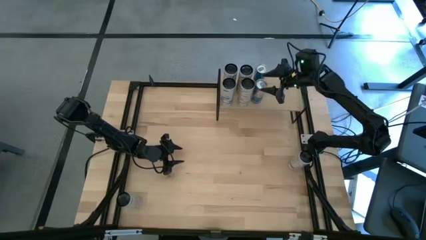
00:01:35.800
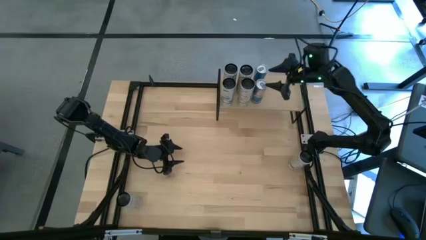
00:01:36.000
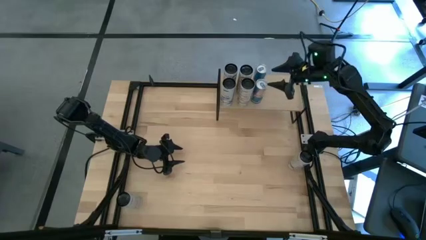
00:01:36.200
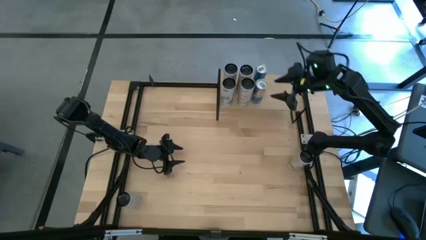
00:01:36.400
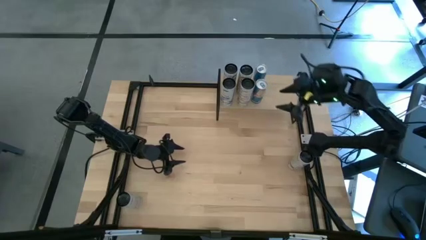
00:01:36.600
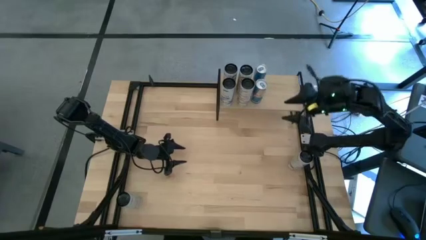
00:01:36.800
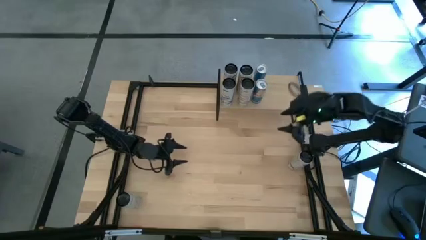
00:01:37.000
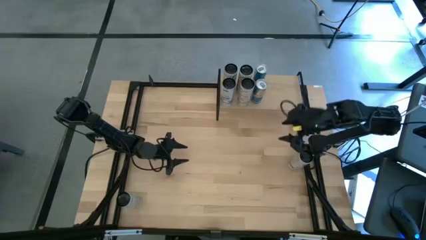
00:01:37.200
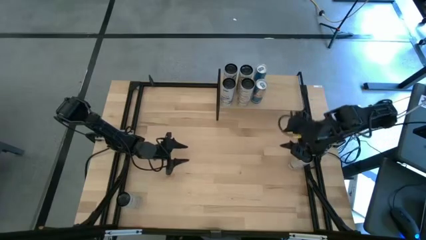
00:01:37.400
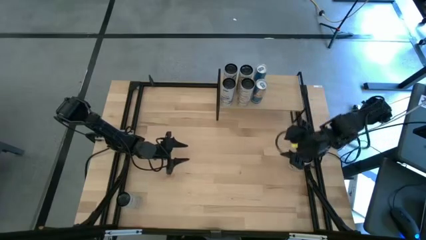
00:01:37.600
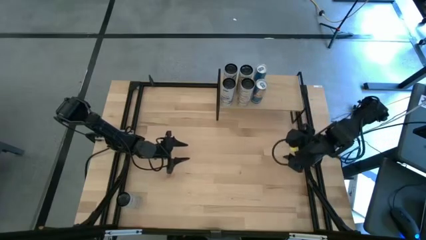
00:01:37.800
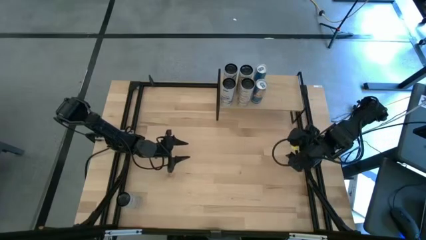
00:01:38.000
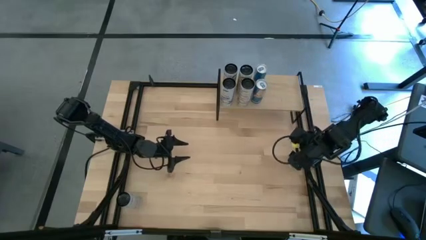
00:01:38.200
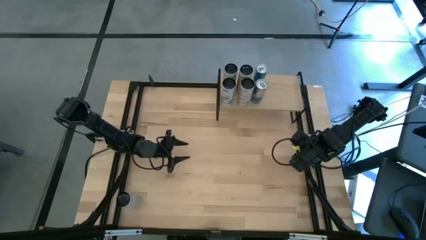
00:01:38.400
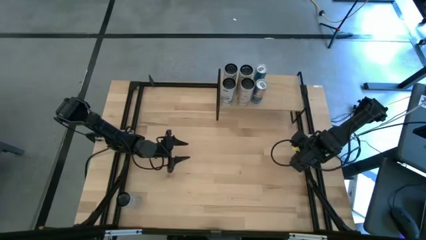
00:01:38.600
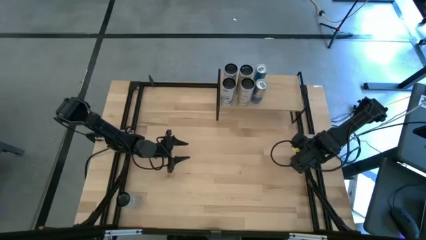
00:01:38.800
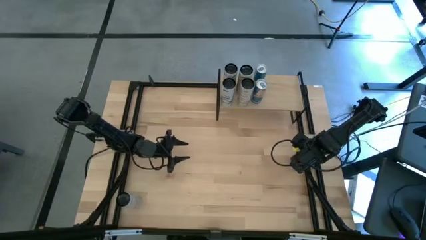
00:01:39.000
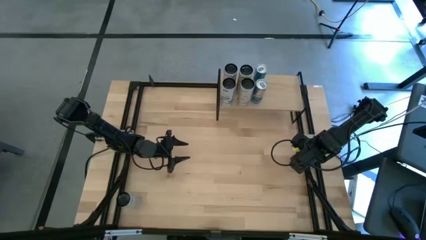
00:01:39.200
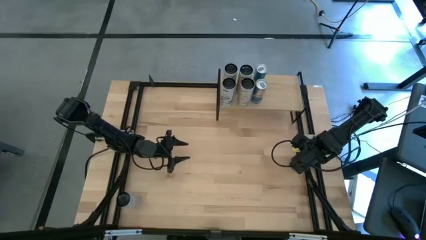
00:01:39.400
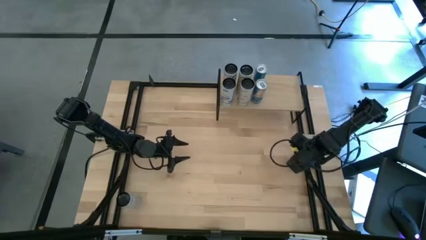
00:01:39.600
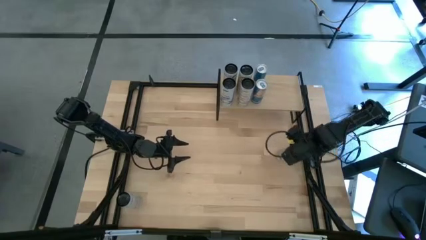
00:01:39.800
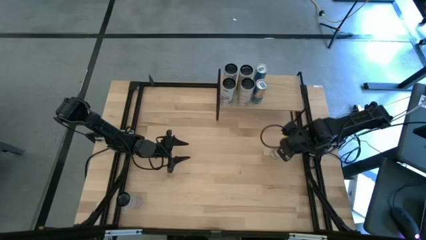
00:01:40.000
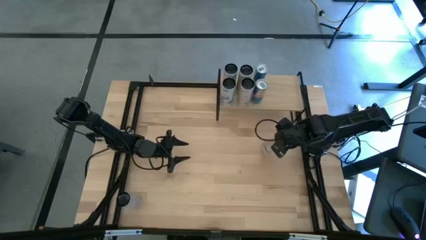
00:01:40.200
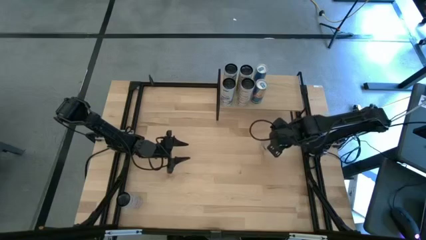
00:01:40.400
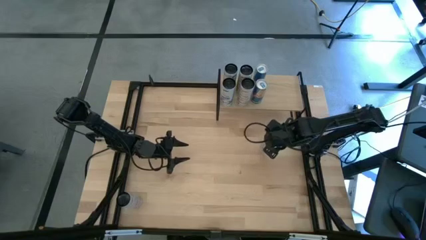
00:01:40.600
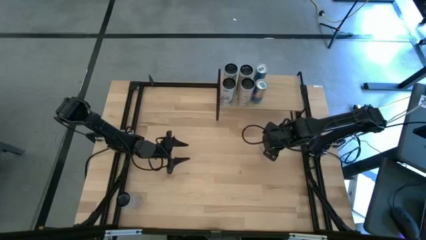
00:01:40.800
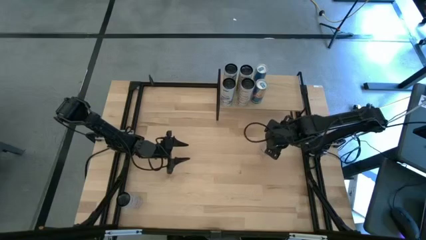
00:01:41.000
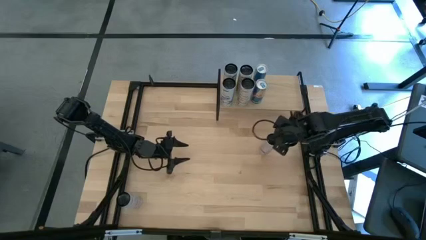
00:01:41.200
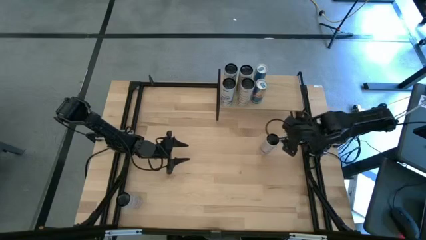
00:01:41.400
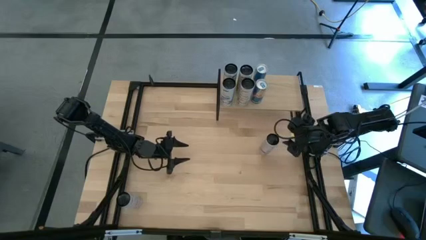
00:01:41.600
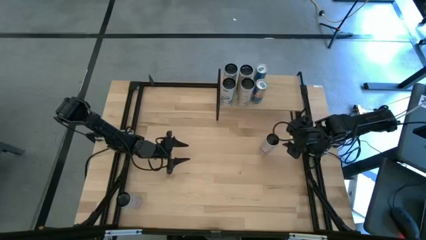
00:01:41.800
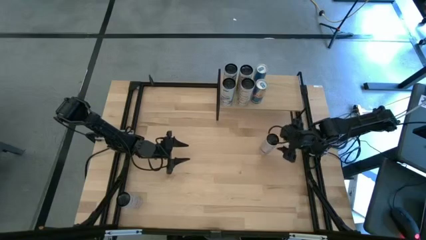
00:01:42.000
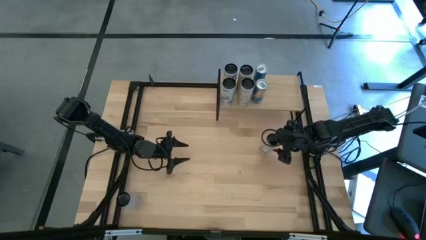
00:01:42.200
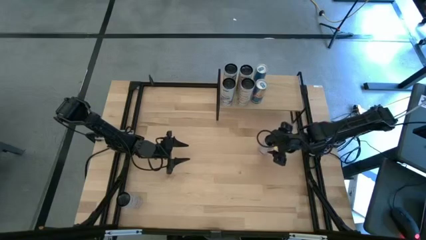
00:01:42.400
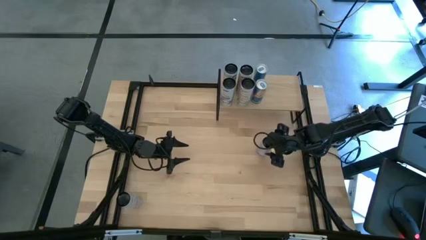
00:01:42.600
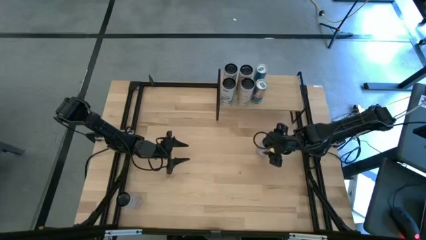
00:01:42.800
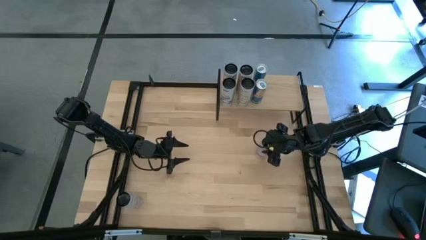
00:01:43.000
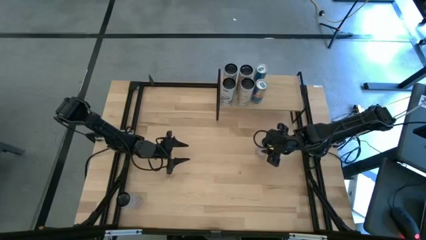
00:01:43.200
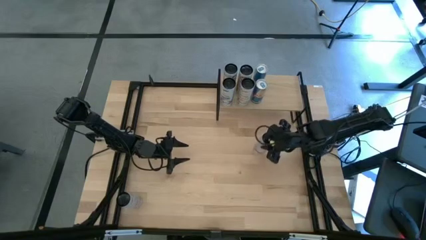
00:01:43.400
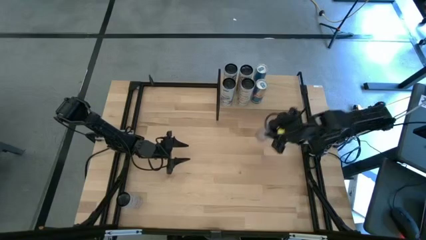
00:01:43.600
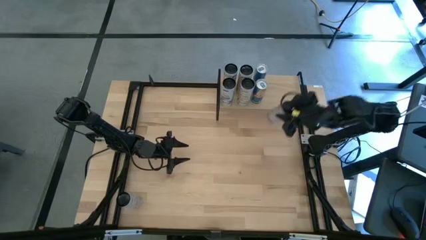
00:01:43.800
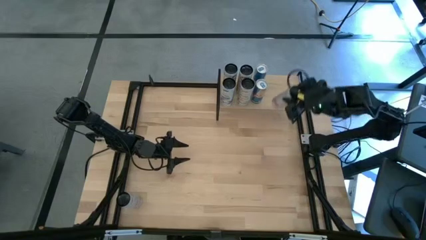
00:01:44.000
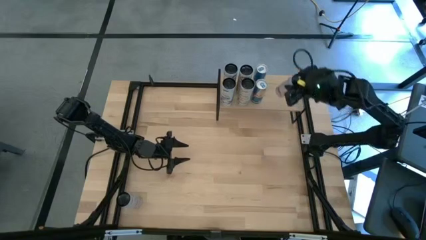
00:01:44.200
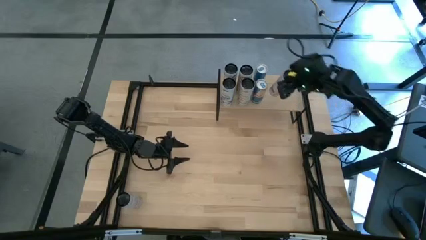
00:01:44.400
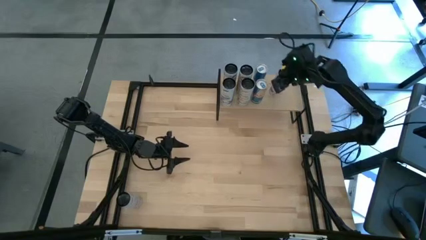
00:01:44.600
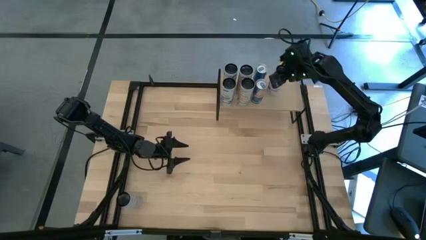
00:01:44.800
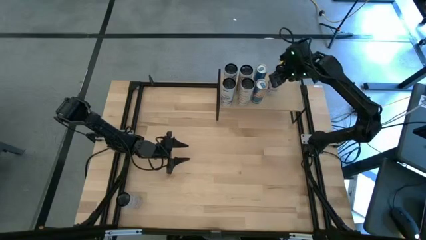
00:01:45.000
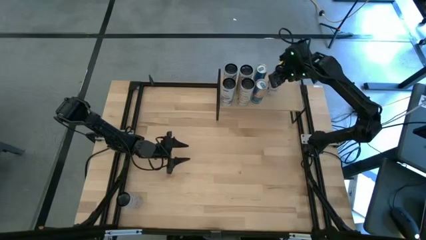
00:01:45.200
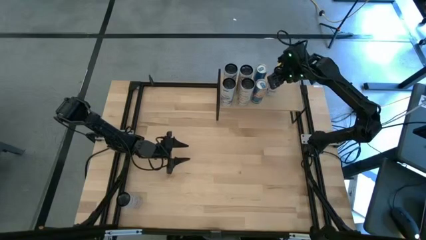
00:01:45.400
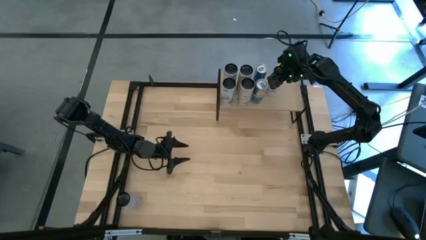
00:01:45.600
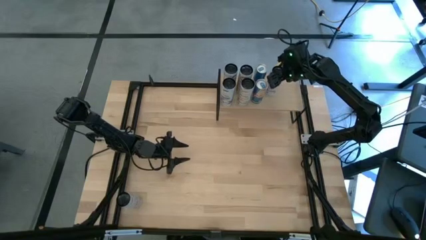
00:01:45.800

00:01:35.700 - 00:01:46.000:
Task: Place canned beverage on shelf
Put the top white pink soda can on the shelf
